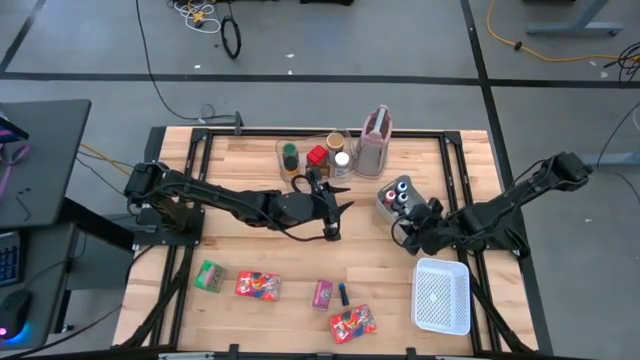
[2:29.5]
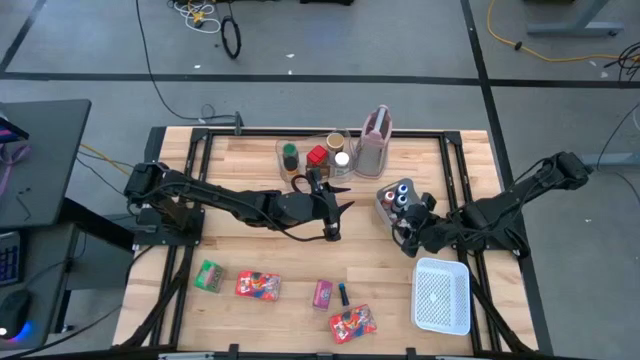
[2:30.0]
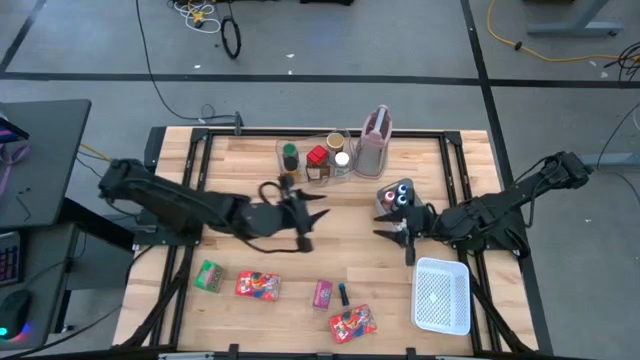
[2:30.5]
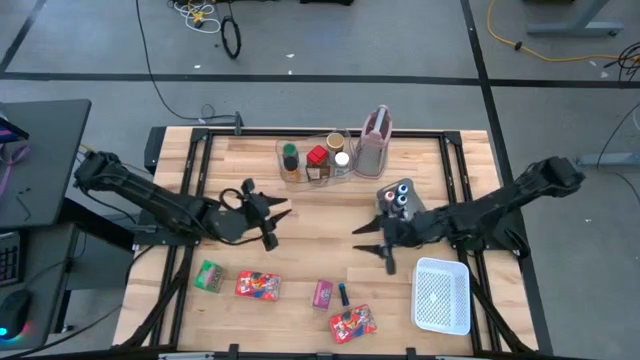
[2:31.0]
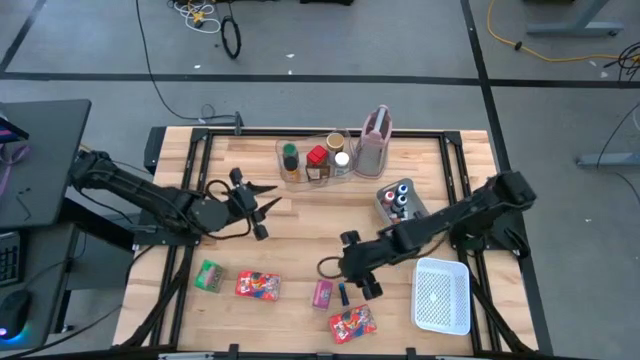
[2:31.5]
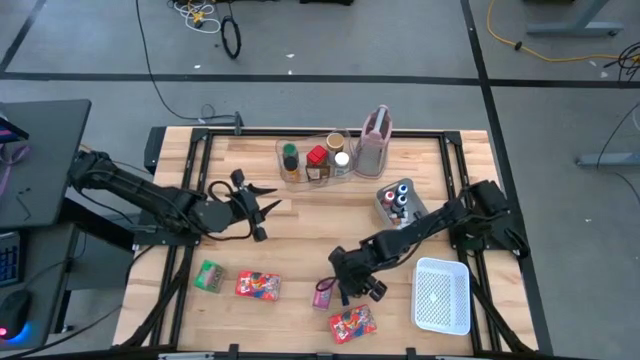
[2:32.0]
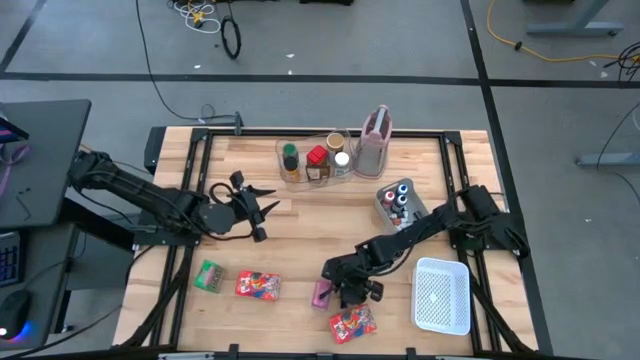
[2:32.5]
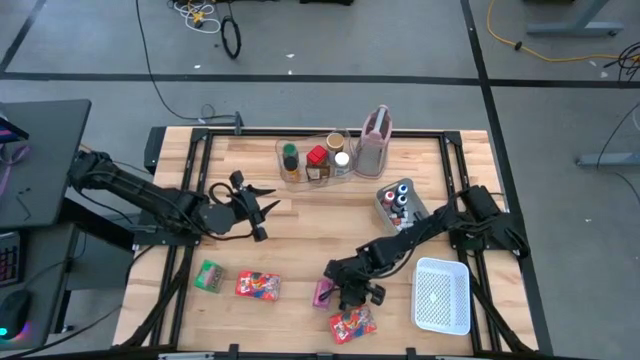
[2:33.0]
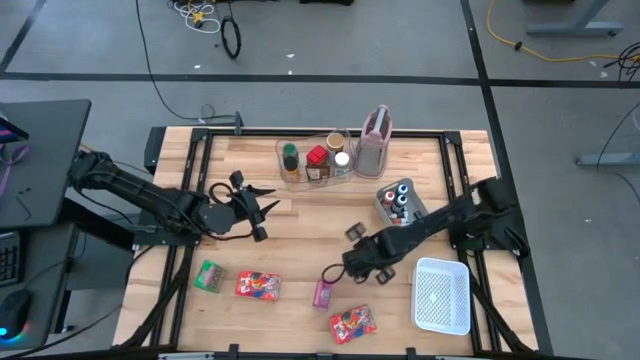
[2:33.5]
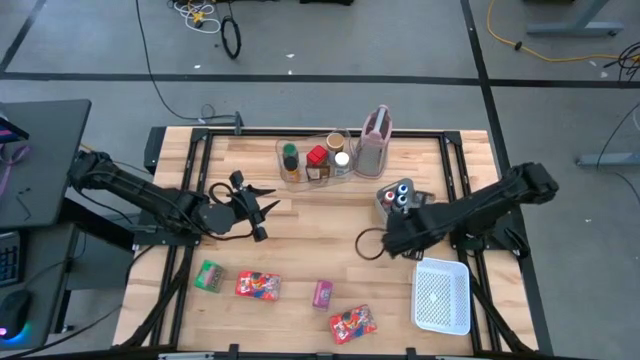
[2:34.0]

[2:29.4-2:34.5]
Task: Pick & Place Kitchen Items
Put the medium blue food coloring bottle into the gray bin

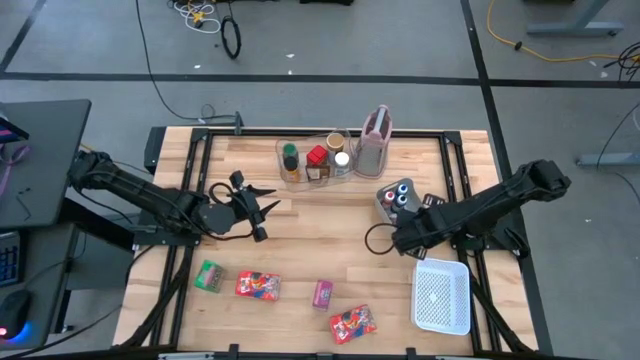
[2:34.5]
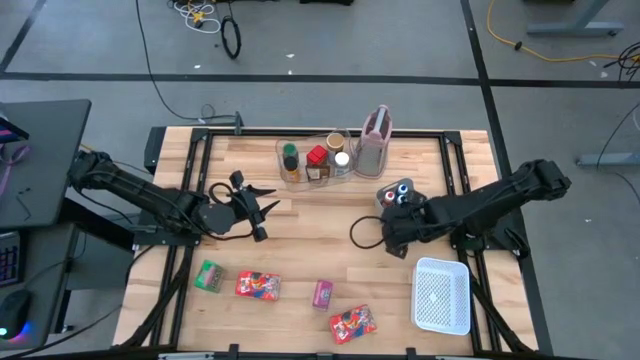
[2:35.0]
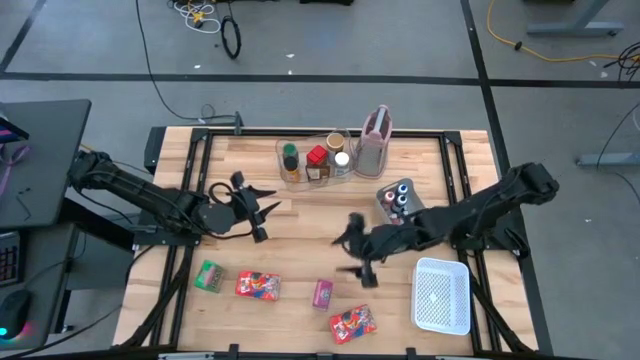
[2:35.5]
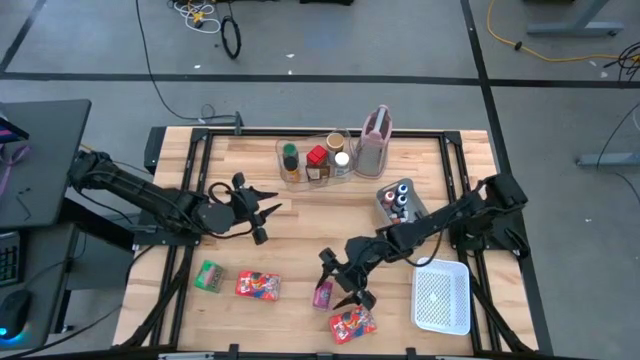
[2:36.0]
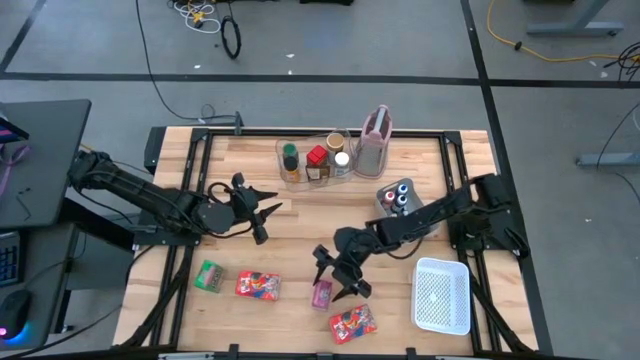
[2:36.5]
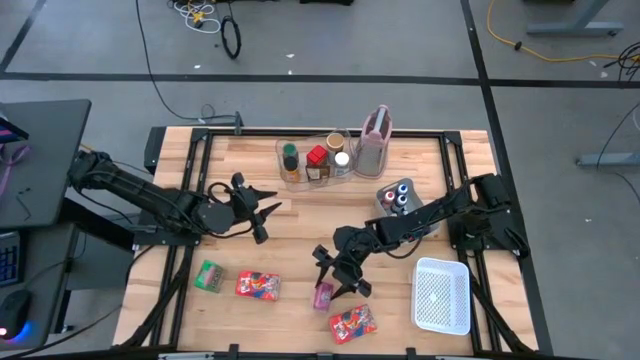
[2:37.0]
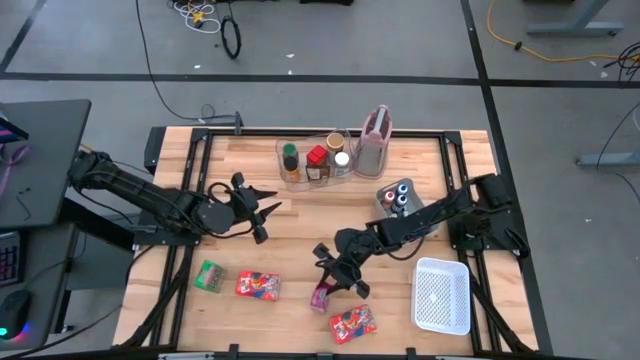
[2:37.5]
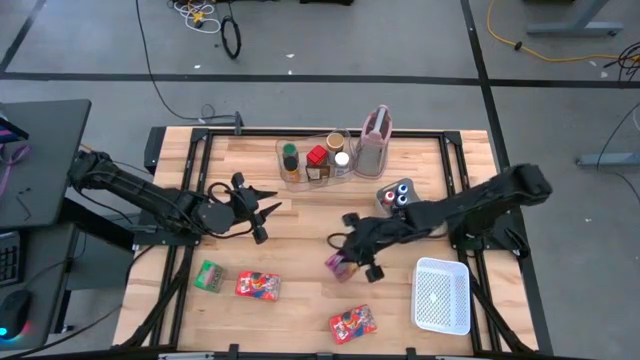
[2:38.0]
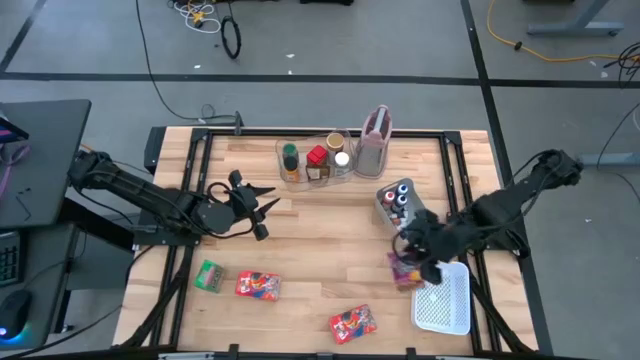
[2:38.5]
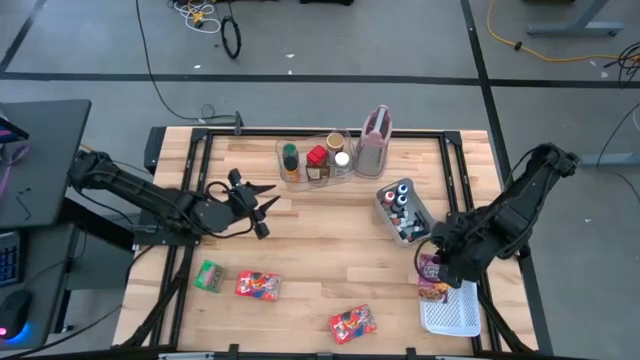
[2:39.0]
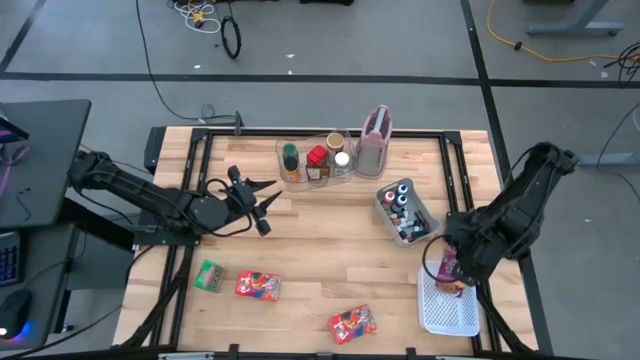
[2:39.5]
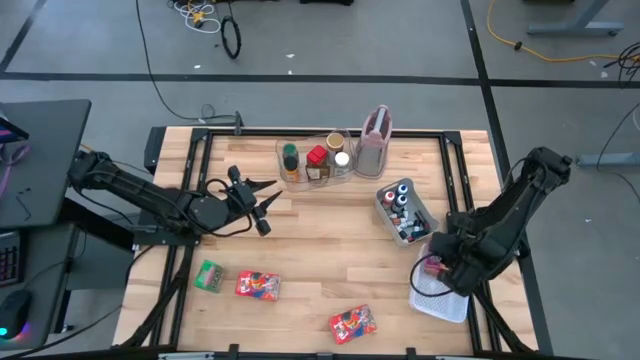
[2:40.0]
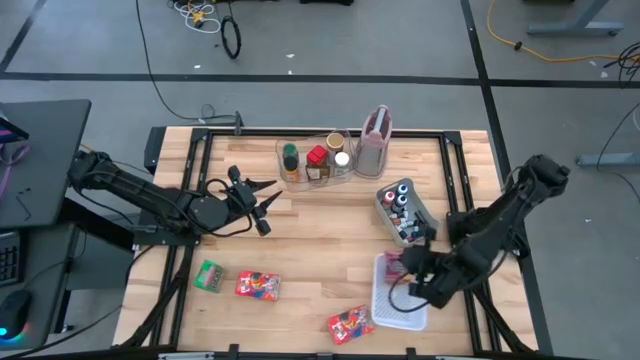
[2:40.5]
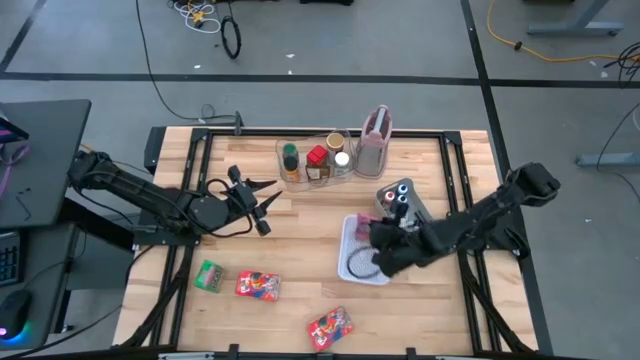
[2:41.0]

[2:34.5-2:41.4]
Put the pink cereal box into the white bin

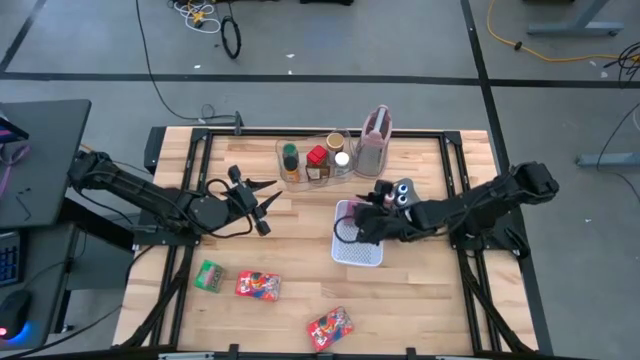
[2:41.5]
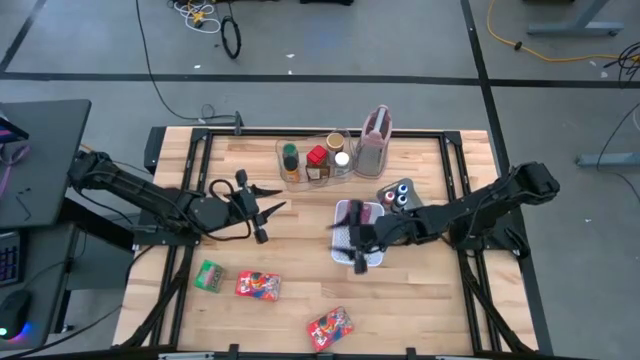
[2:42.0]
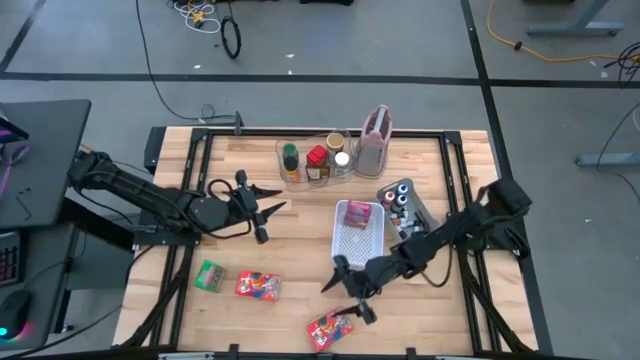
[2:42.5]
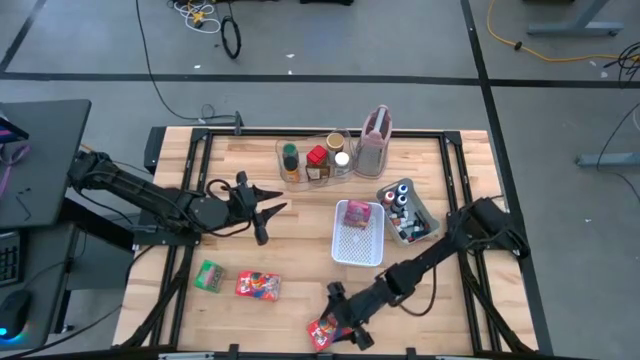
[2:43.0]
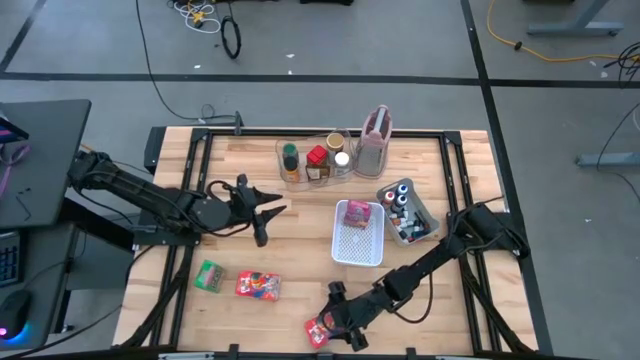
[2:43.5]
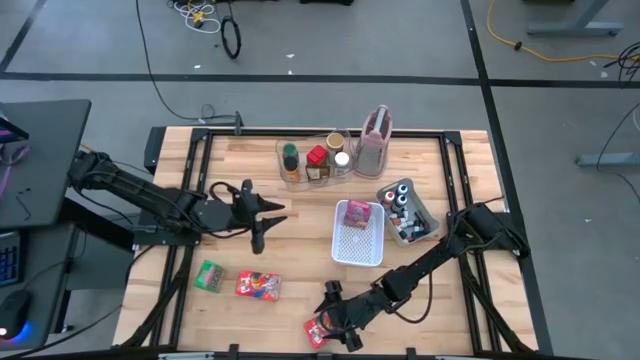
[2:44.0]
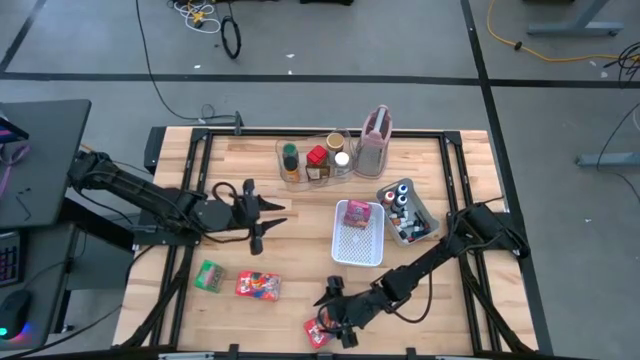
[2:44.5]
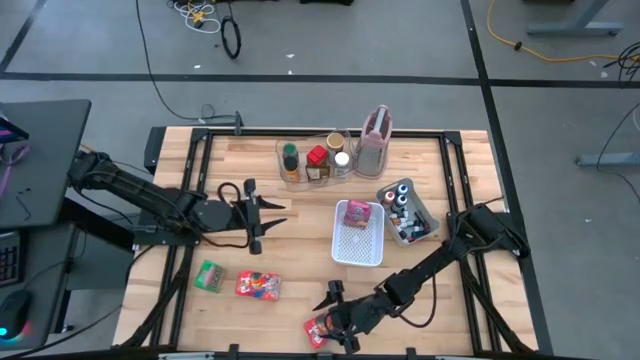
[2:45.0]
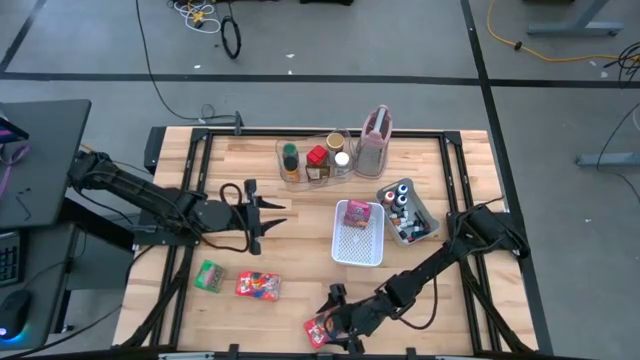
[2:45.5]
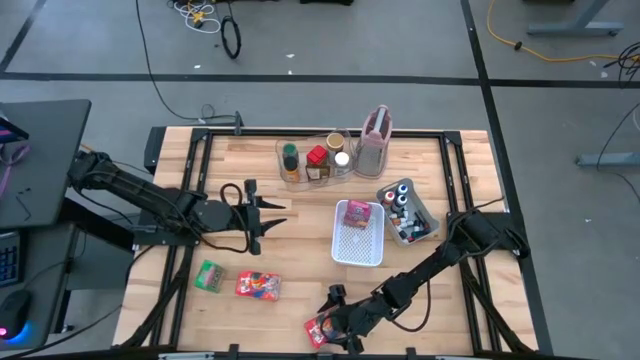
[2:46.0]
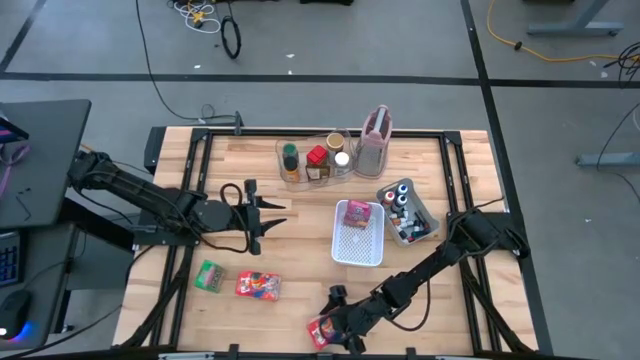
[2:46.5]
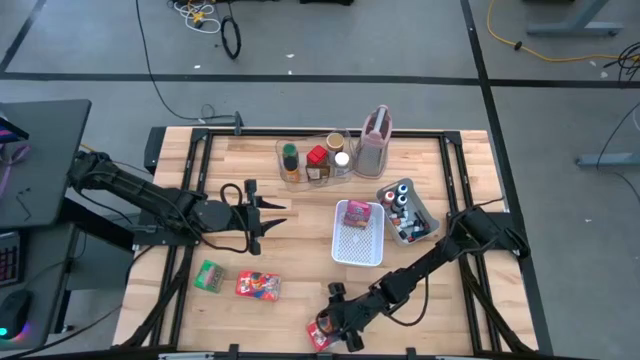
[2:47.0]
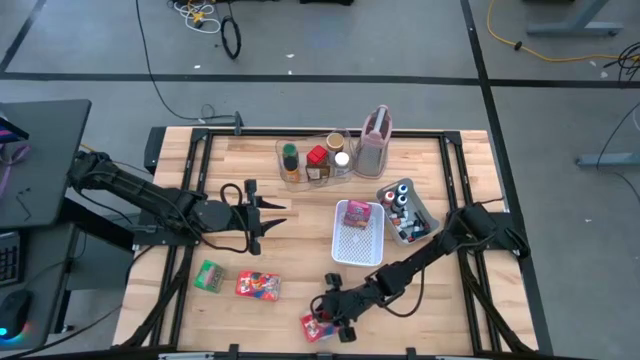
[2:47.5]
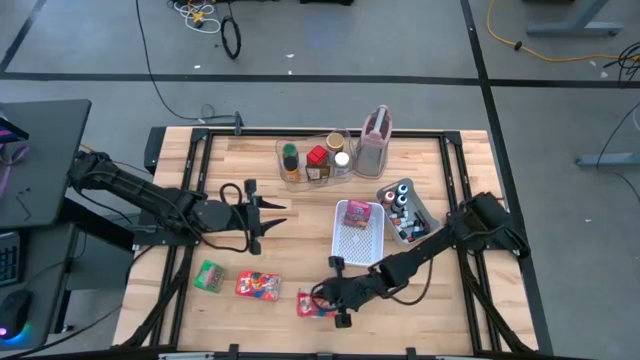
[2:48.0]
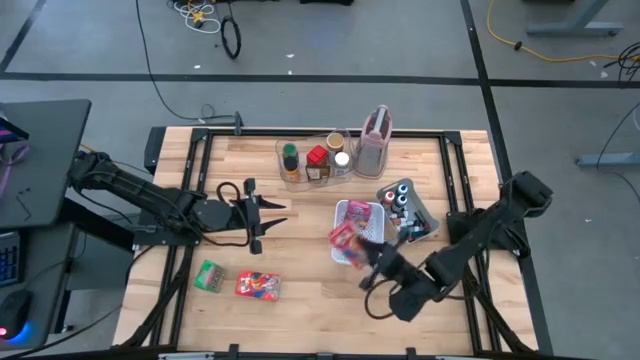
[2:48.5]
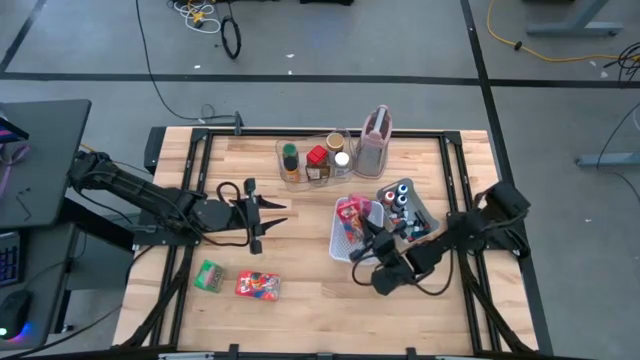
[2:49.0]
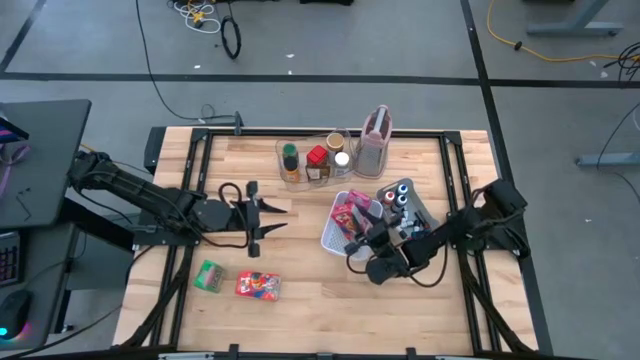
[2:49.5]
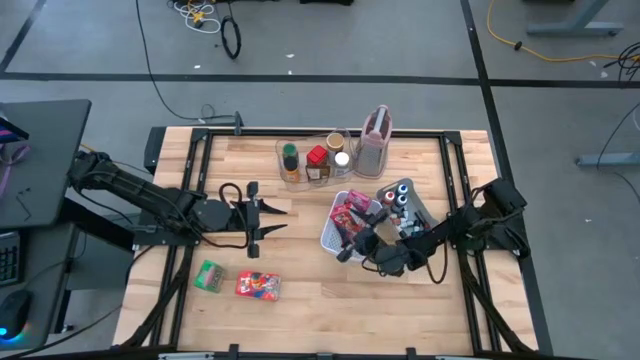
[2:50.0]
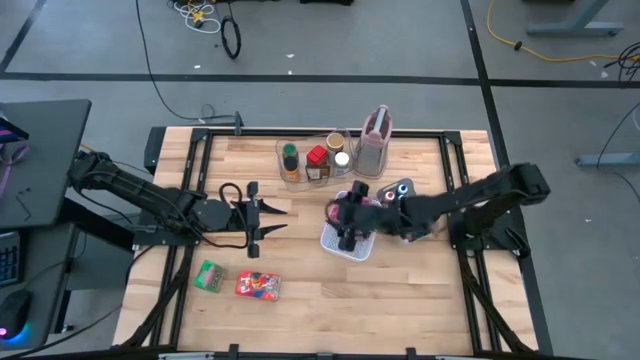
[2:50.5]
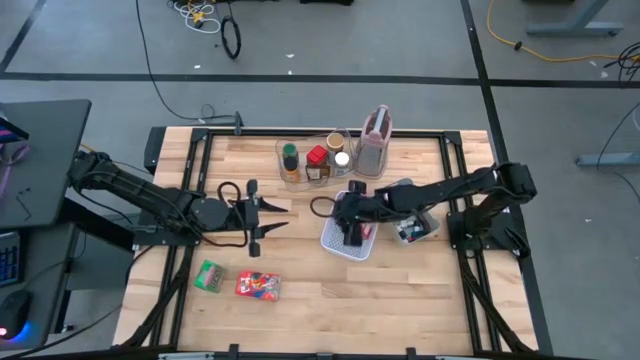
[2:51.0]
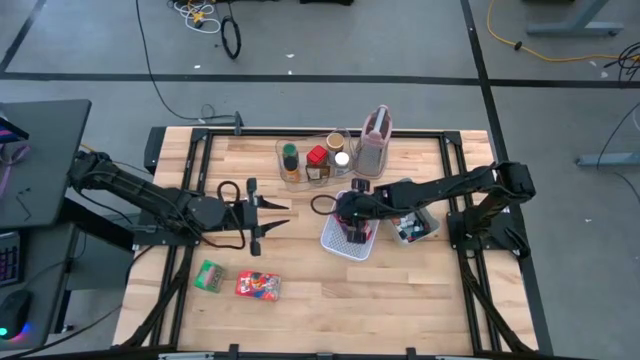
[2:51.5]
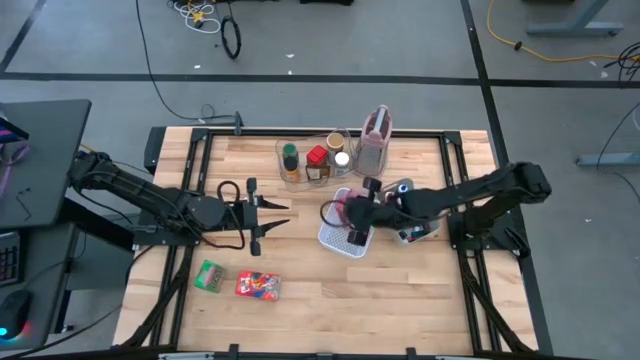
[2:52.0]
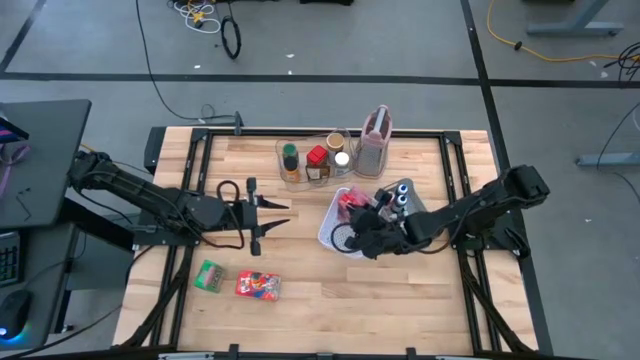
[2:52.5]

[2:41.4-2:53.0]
Put the red cereal box into the white bin
